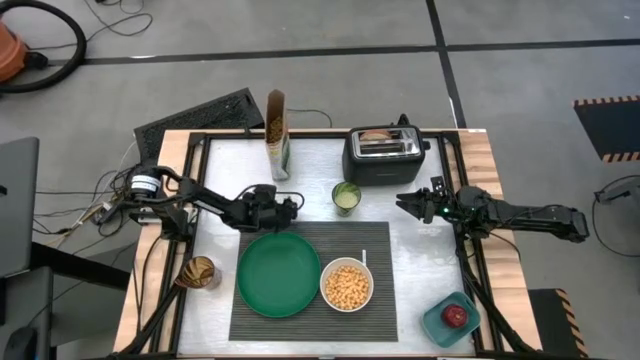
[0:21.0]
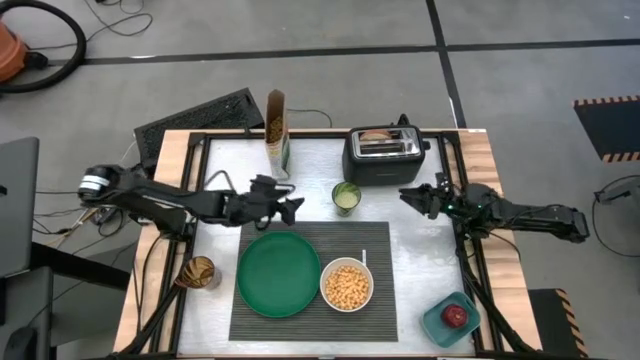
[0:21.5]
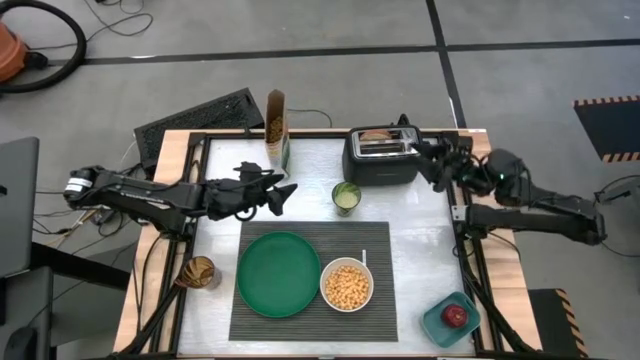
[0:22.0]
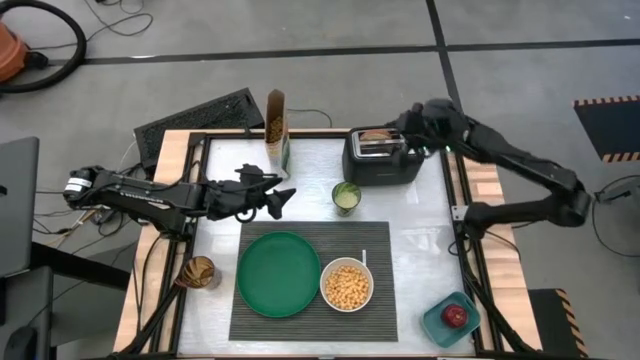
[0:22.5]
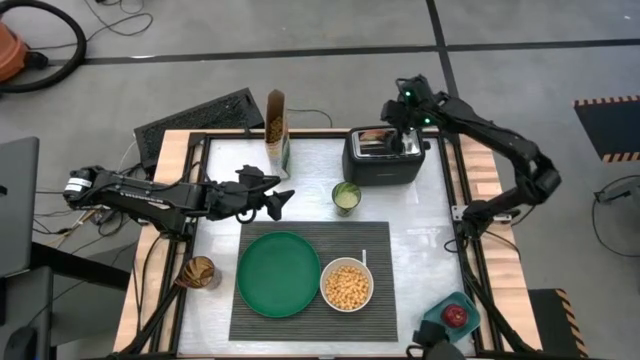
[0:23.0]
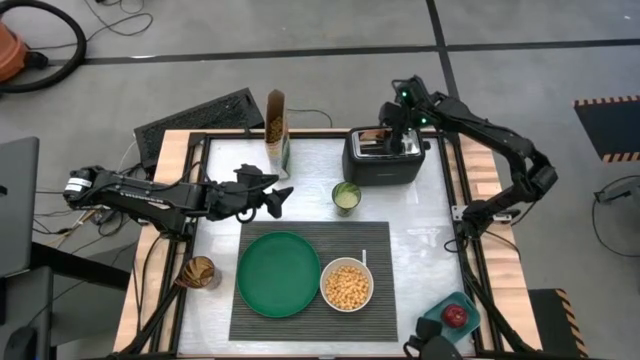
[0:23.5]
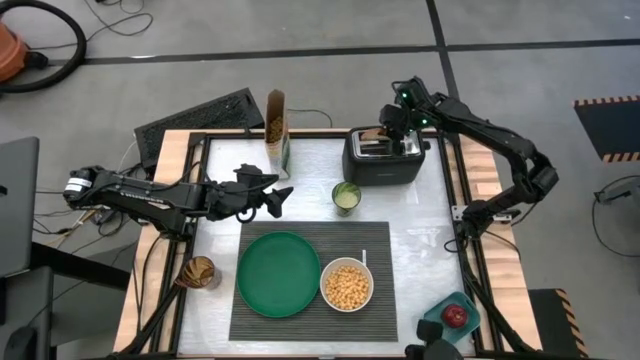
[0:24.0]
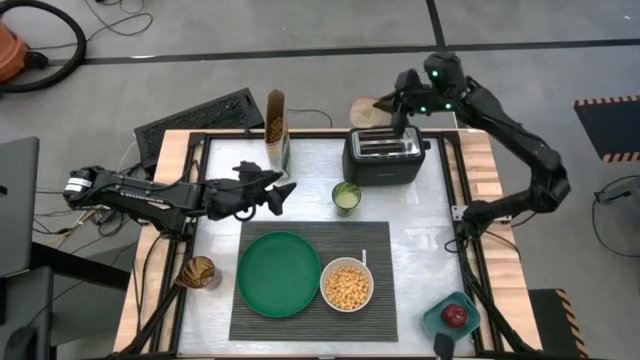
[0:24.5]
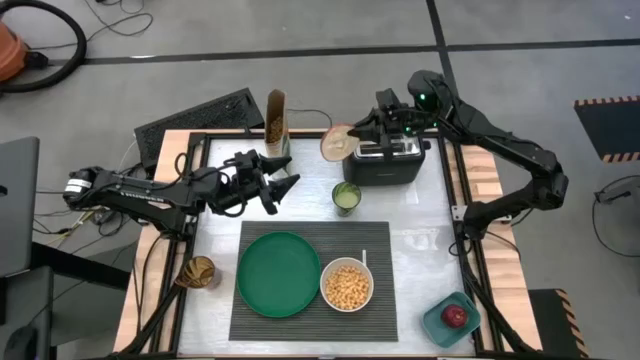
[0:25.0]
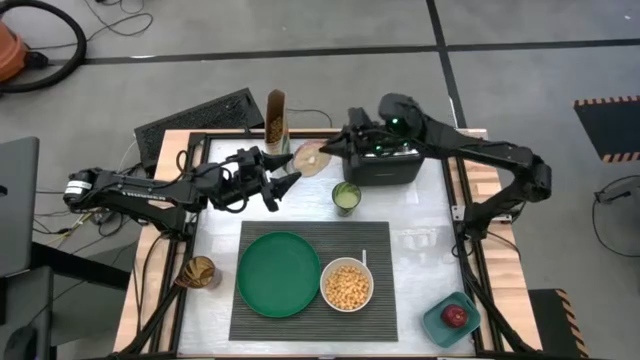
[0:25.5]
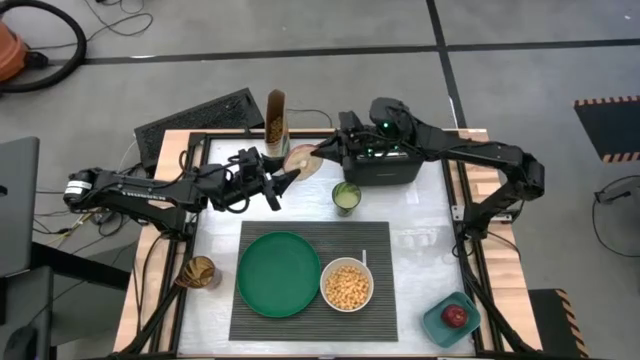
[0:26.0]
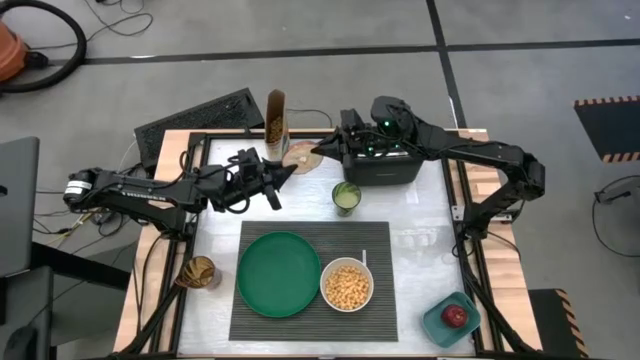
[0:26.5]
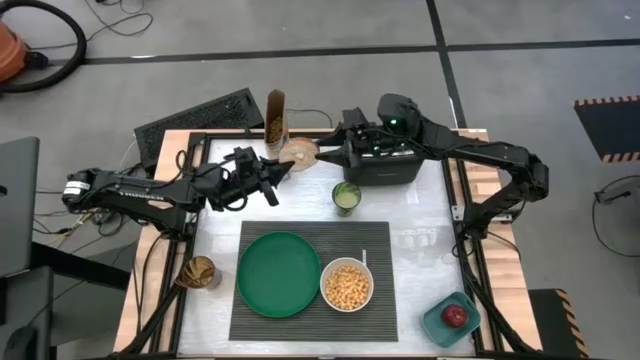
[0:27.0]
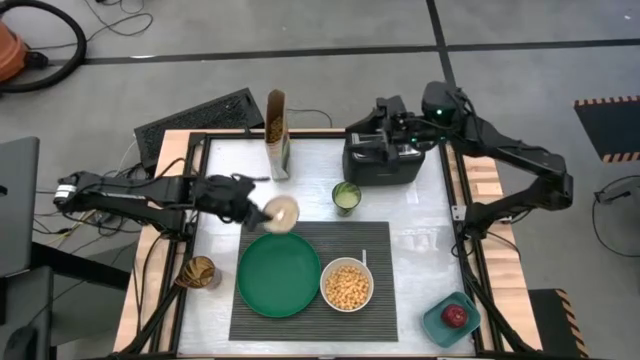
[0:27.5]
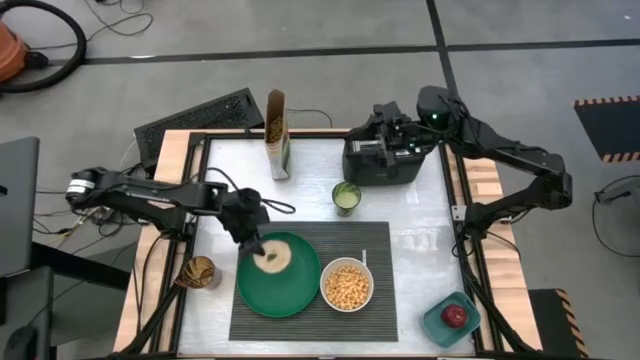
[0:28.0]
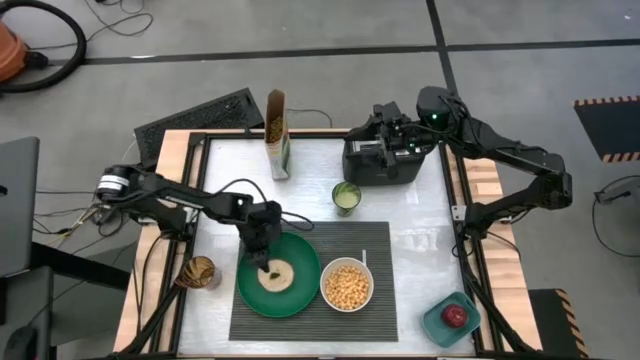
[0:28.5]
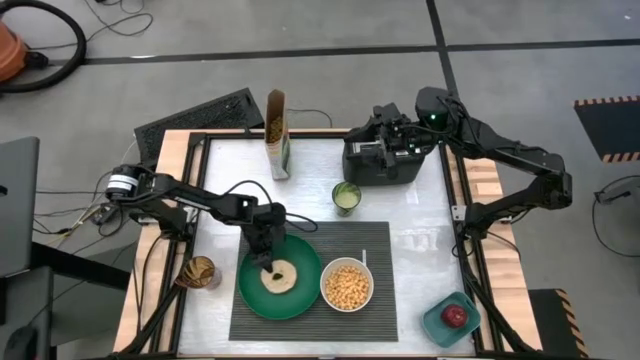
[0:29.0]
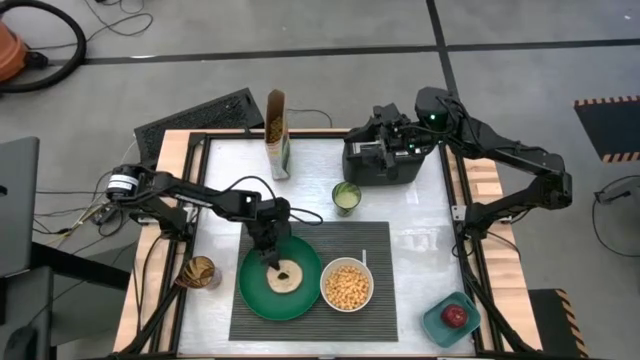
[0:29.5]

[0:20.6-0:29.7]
Task: Arrange a breakfast setting
Put the bagel on the green plate

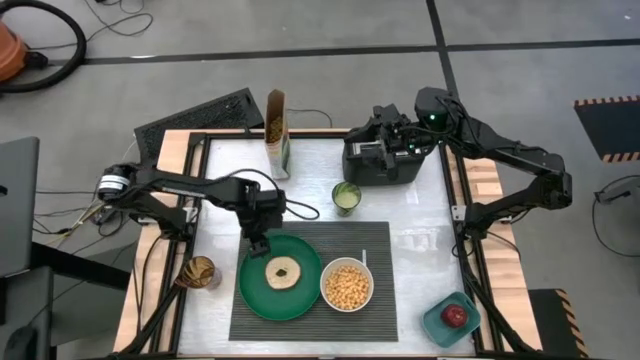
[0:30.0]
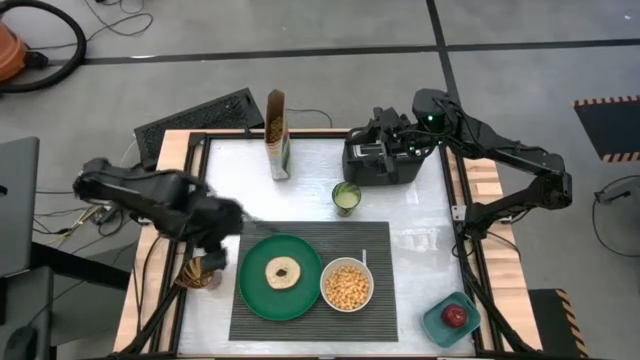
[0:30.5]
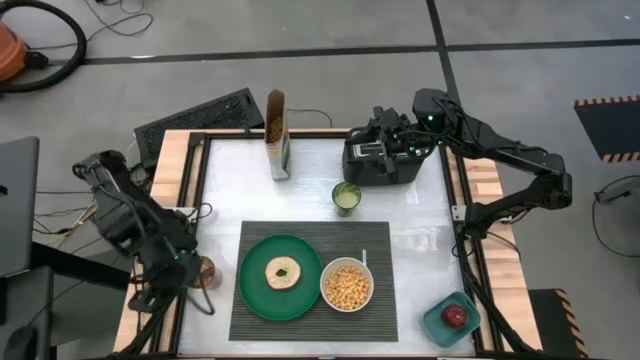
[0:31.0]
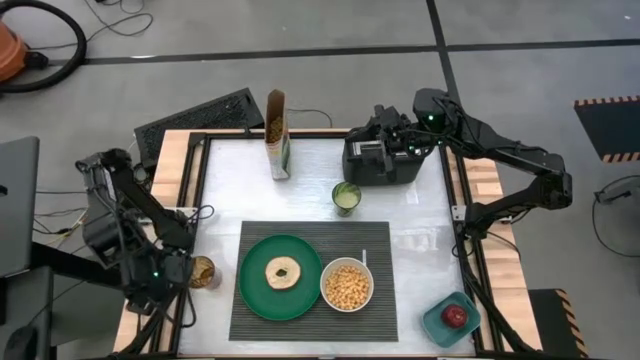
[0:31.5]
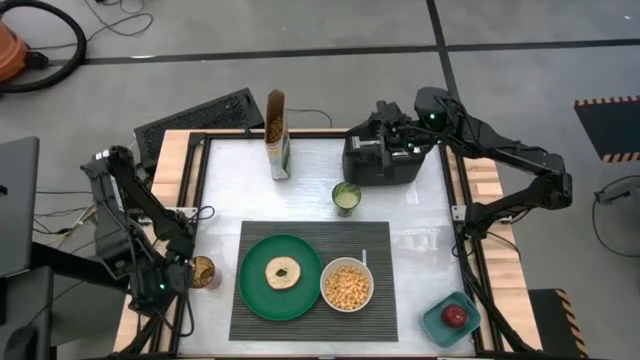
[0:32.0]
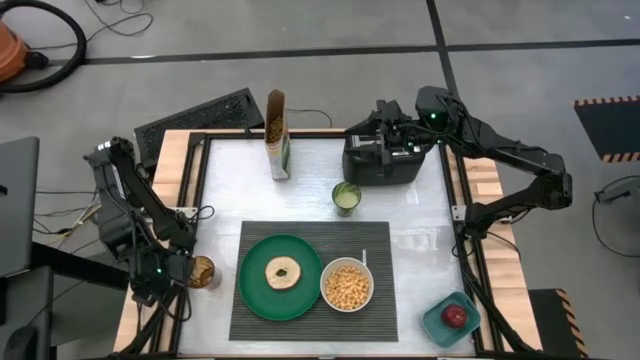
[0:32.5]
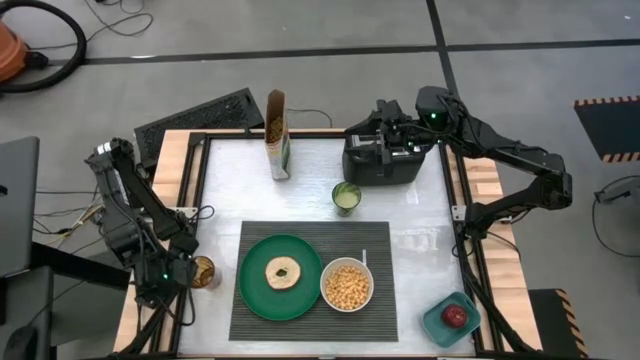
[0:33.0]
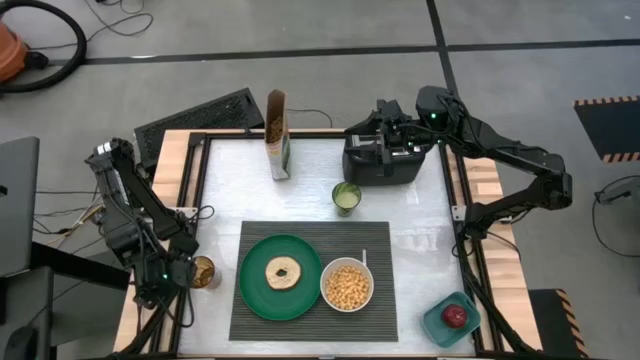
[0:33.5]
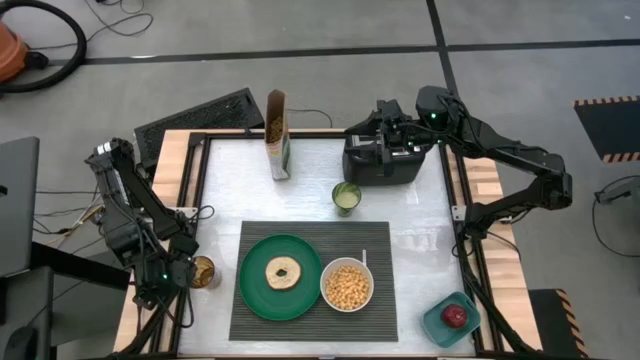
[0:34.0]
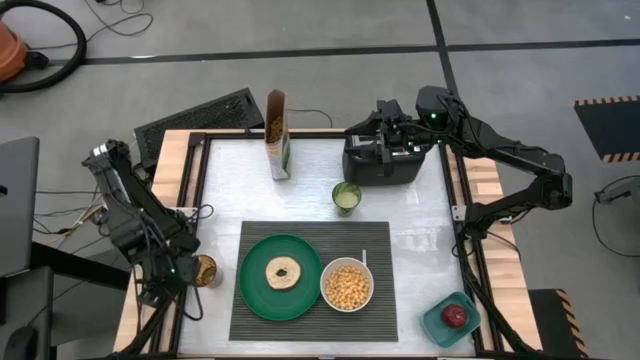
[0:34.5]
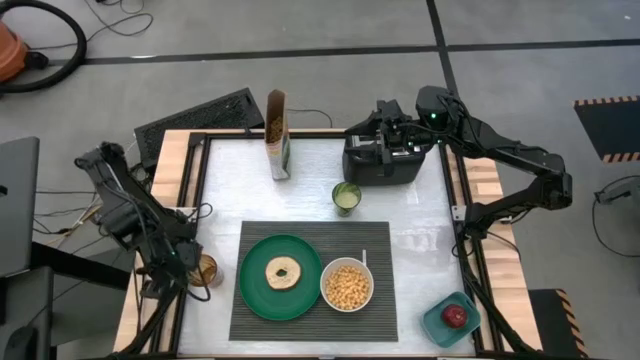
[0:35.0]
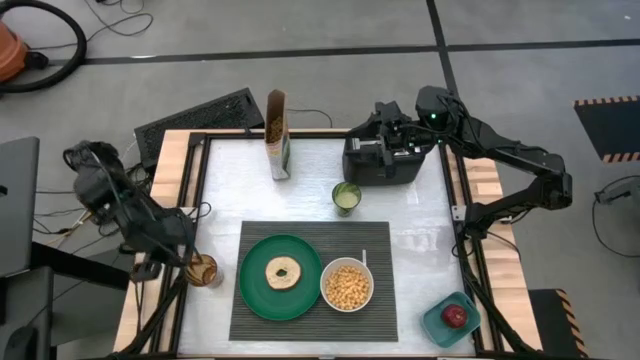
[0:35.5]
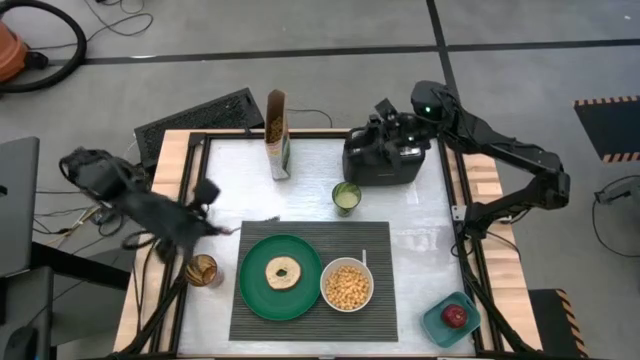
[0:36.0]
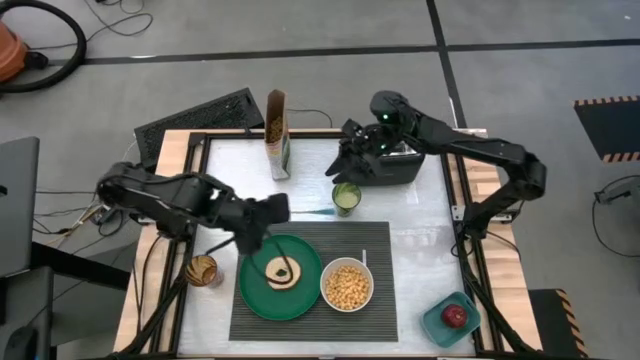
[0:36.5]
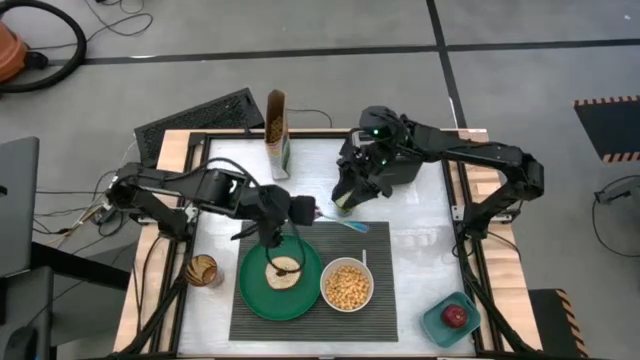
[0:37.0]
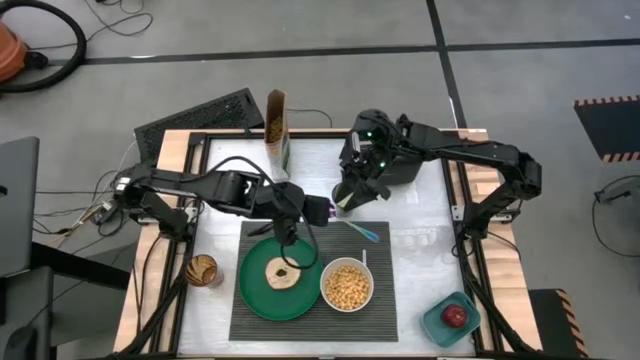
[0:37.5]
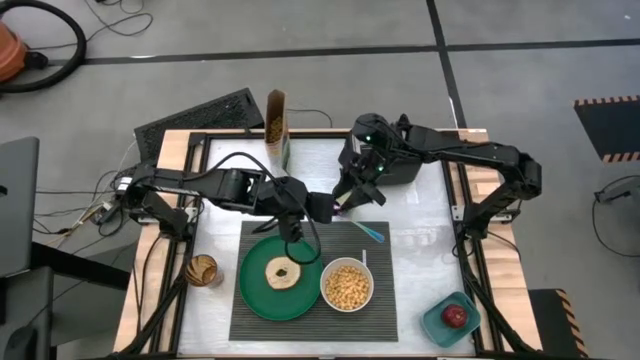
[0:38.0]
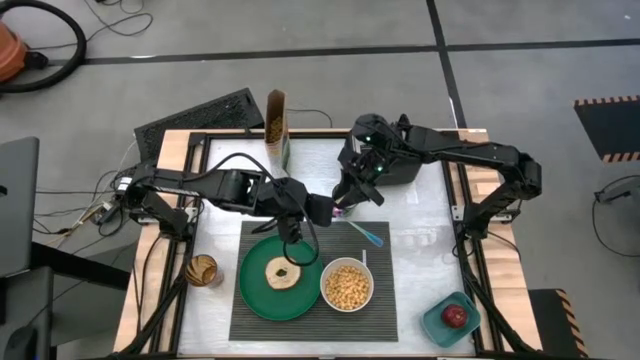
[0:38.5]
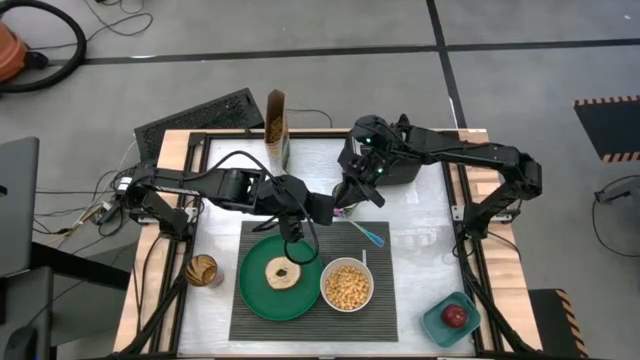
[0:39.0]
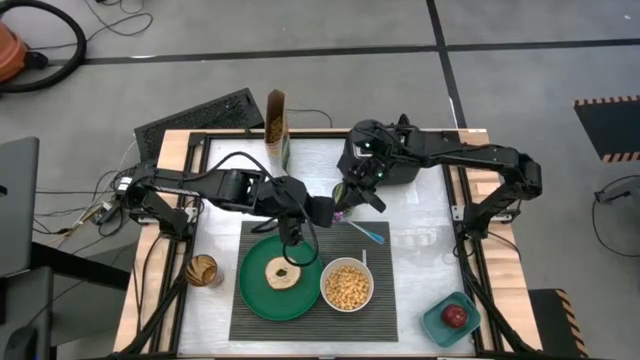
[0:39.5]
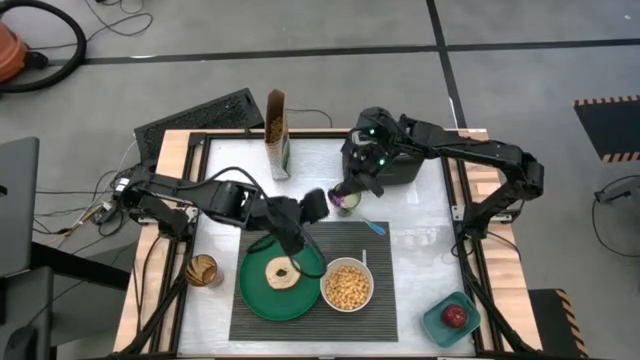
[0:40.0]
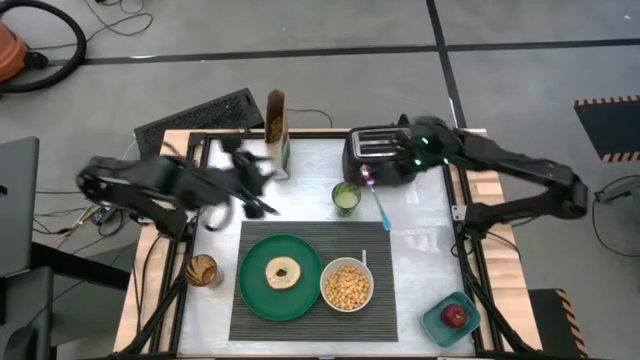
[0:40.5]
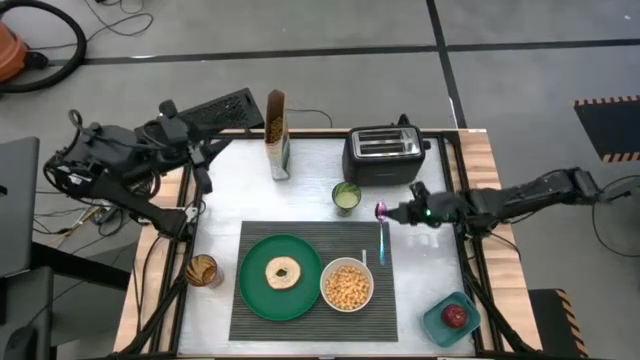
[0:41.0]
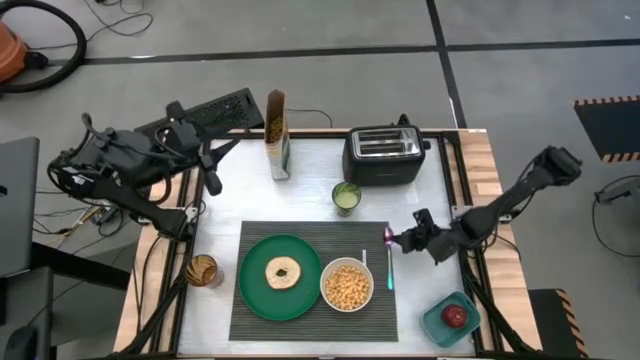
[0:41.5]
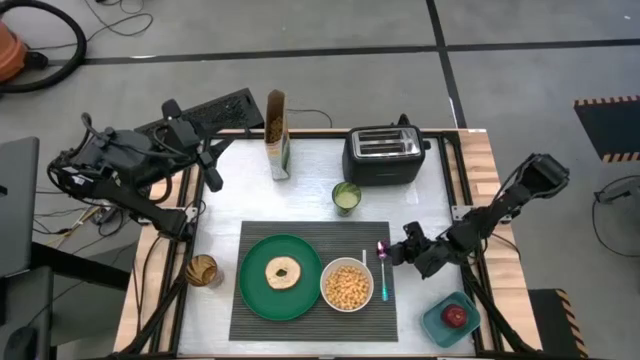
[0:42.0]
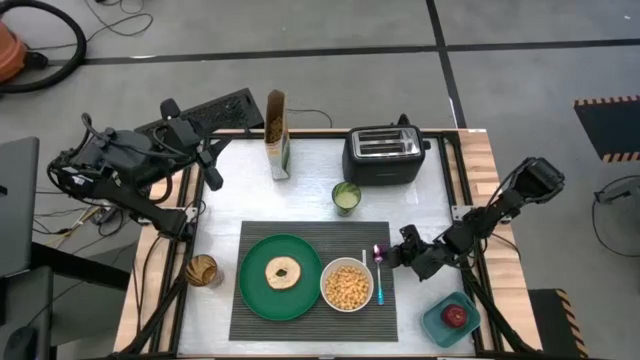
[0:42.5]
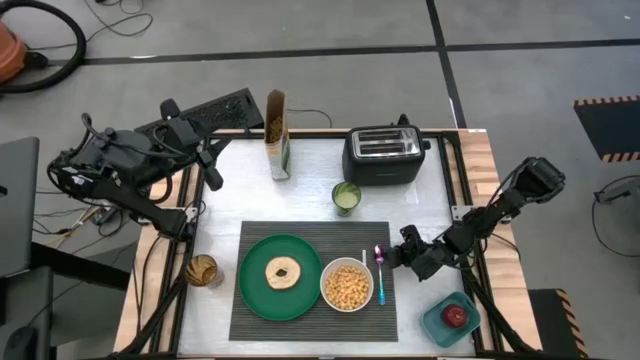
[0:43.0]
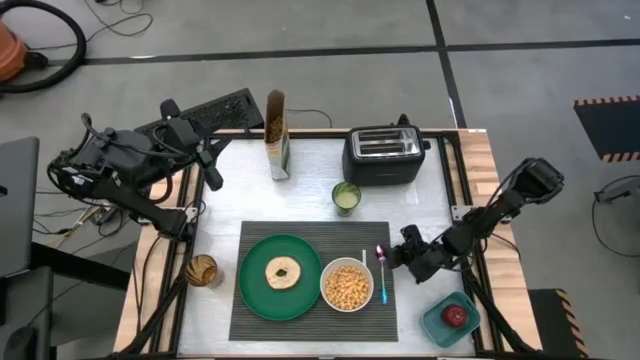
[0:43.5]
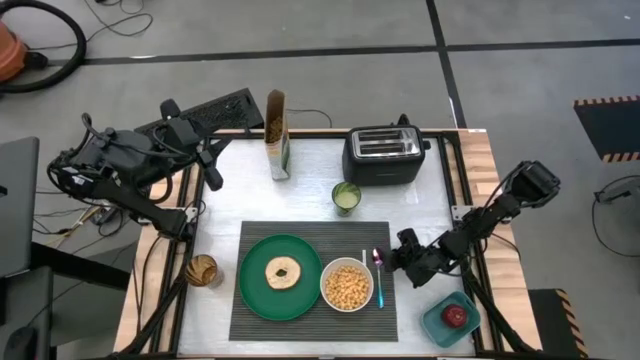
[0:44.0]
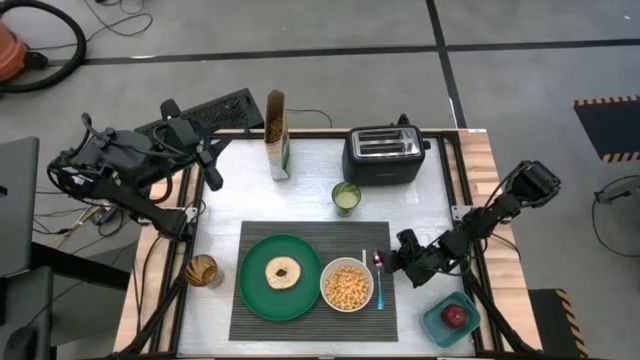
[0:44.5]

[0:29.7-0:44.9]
Put the spoon on the black placemat to the right of the white bowl
